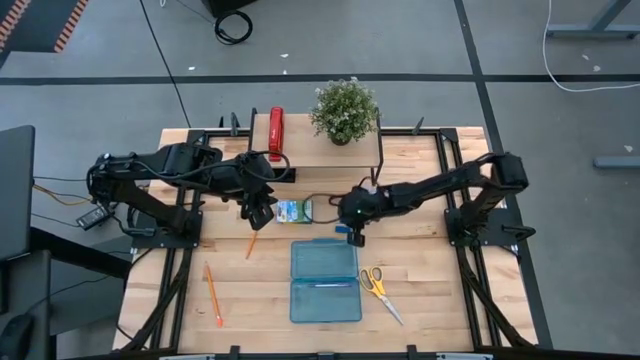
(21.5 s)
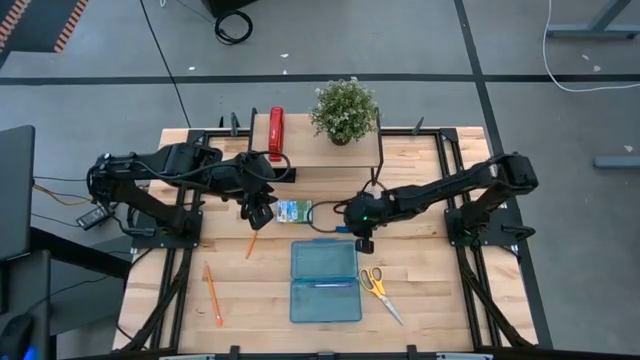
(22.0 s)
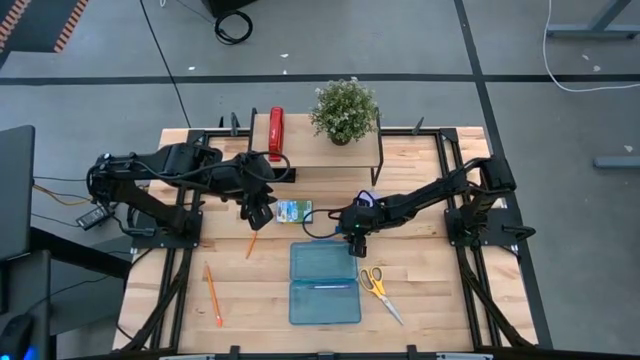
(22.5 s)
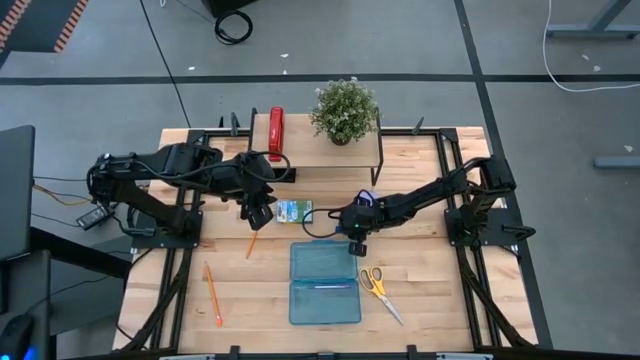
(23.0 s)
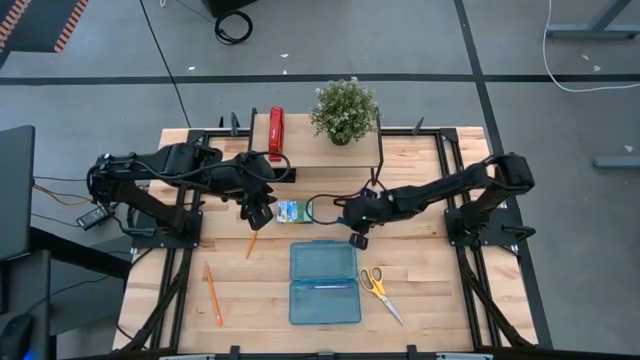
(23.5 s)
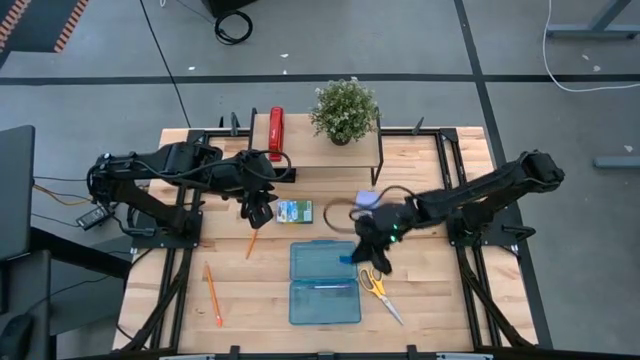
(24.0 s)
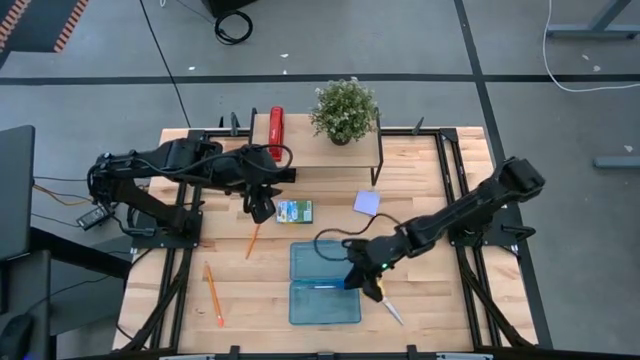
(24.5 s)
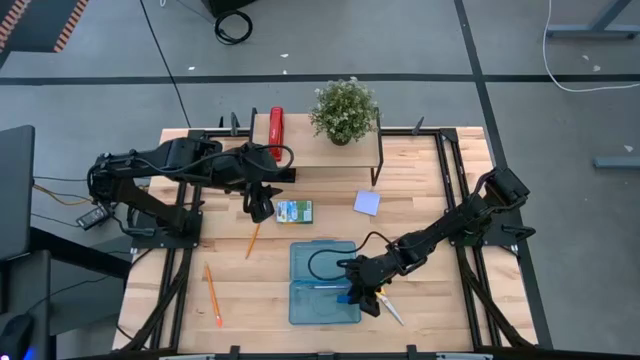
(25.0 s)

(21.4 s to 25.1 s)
Task: Pack school essentials
Put the blue eraser into the blue supply box

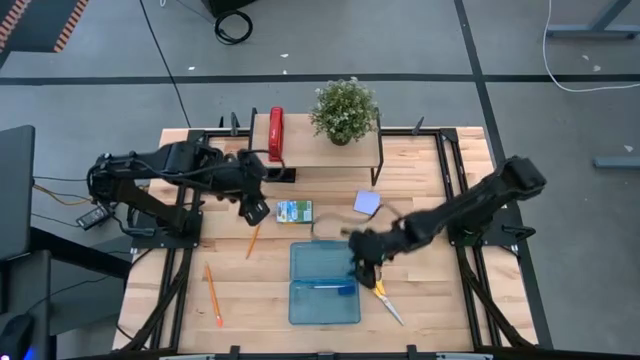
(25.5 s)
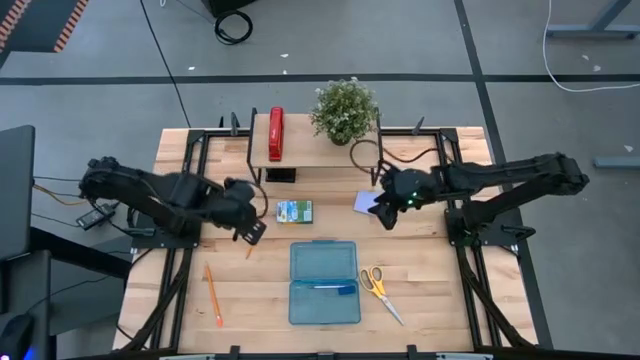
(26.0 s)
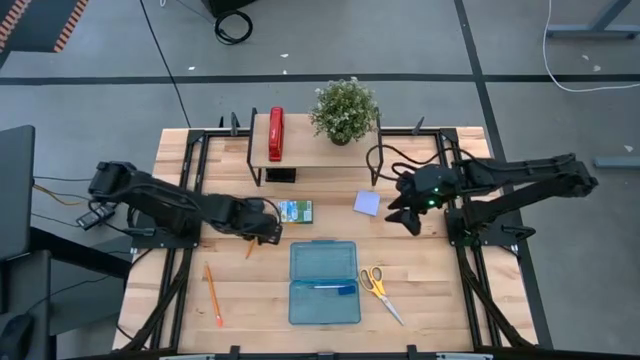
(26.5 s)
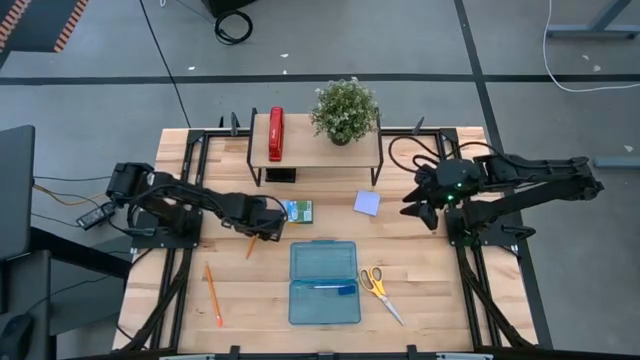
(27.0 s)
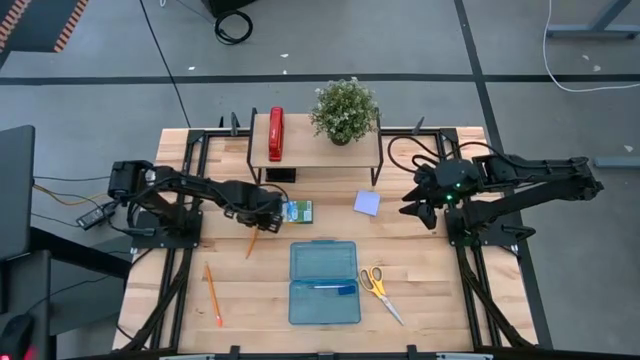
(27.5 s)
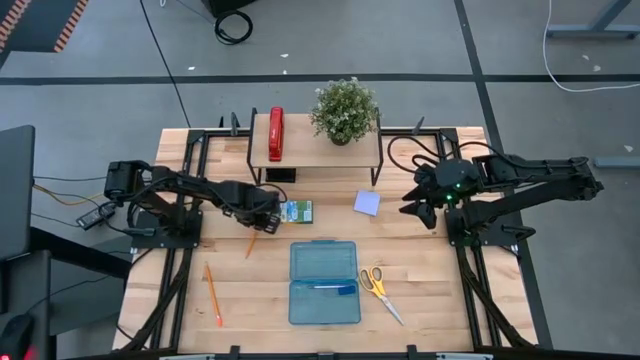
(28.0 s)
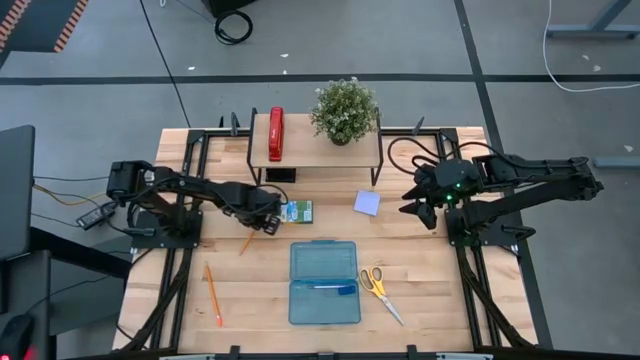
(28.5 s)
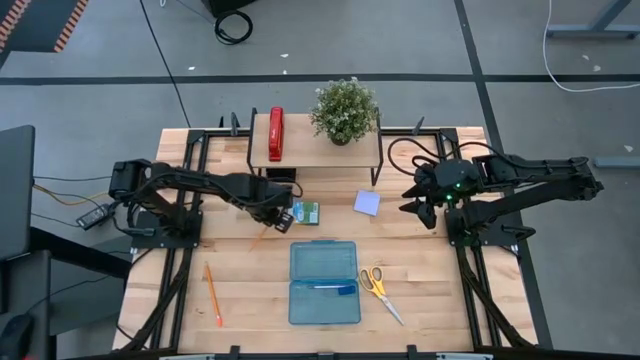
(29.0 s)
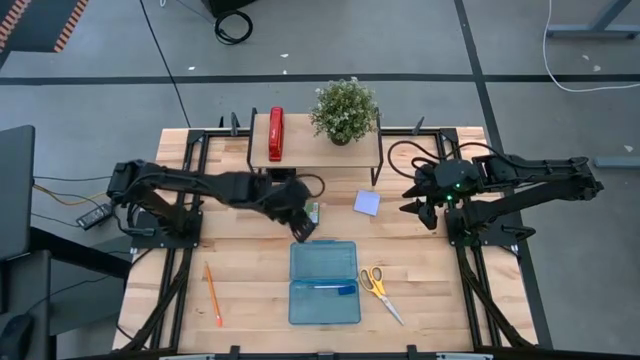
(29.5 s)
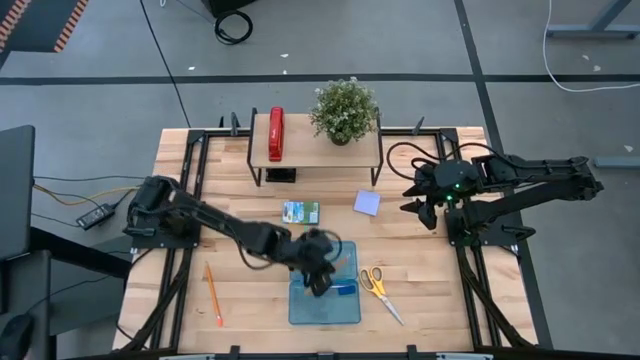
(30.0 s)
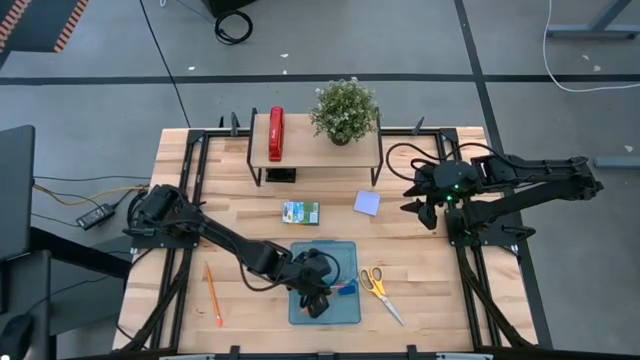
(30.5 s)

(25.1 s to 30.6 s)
Put the top yellow pencil into the blue supply box

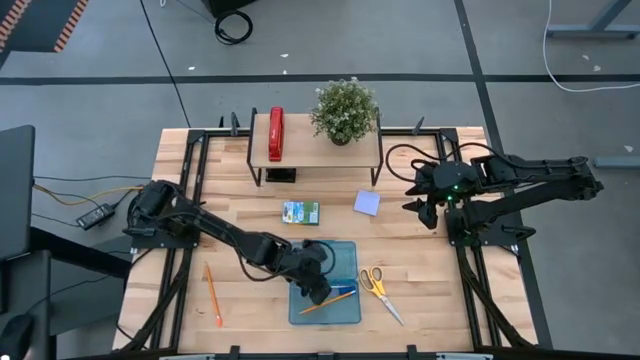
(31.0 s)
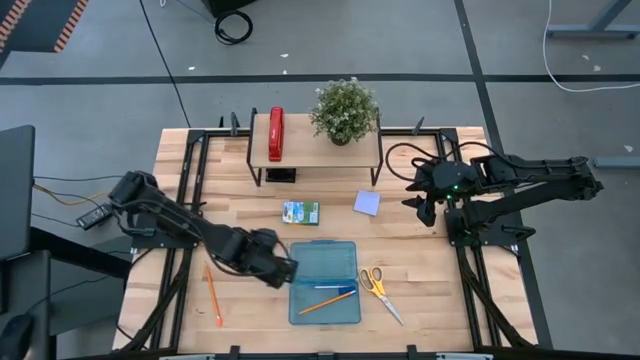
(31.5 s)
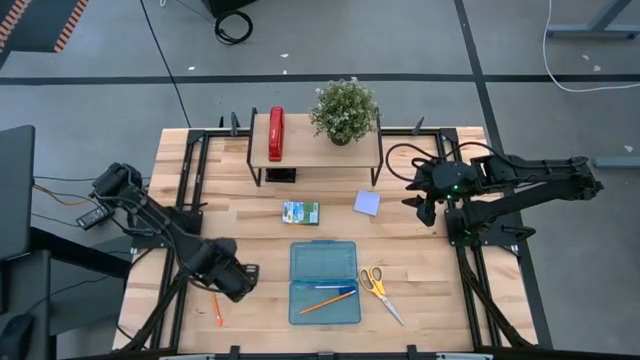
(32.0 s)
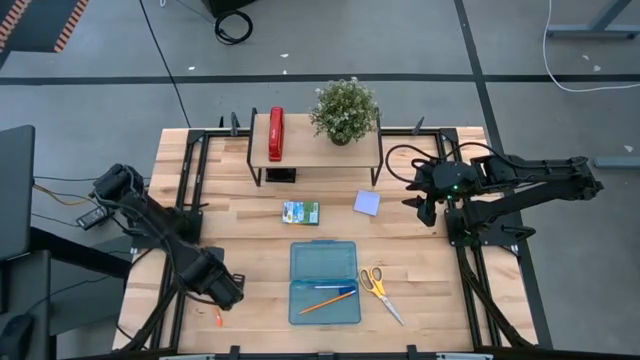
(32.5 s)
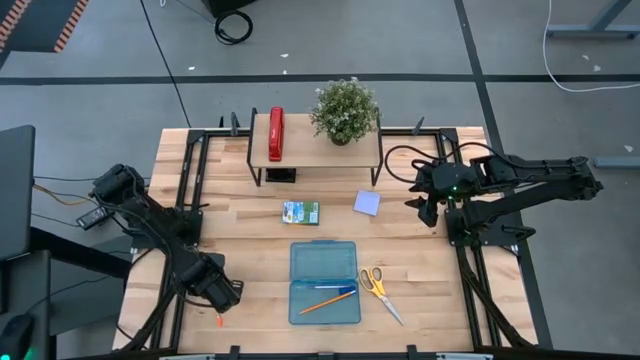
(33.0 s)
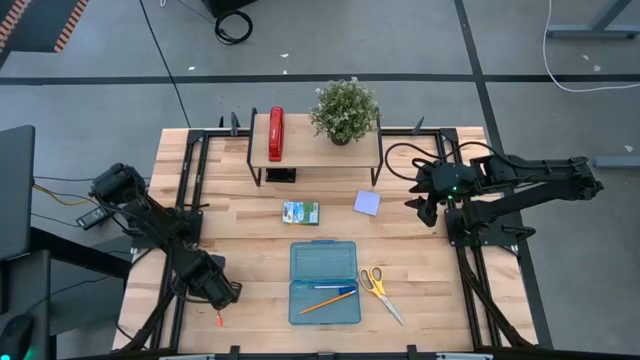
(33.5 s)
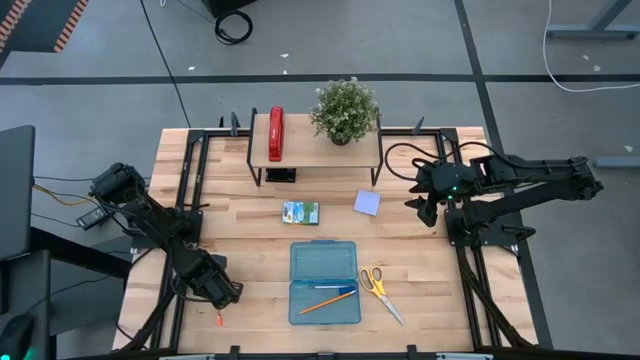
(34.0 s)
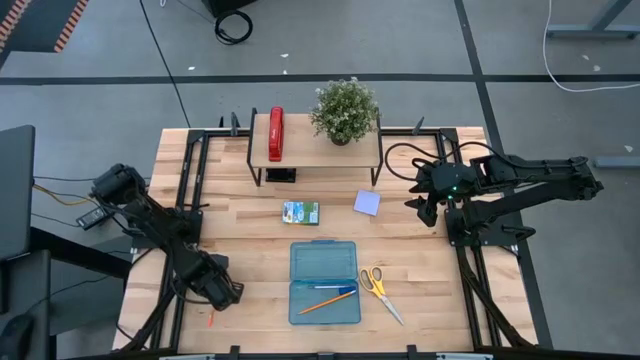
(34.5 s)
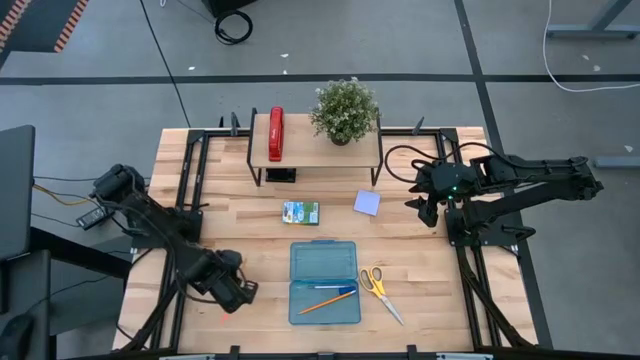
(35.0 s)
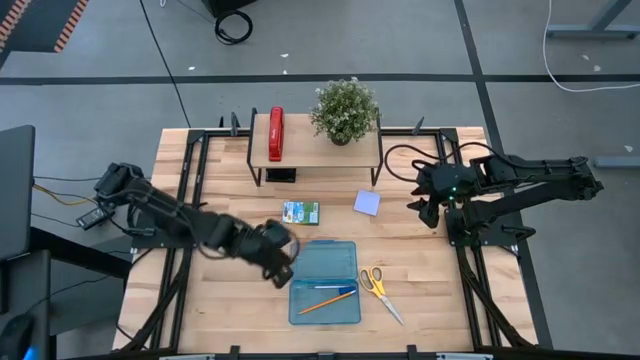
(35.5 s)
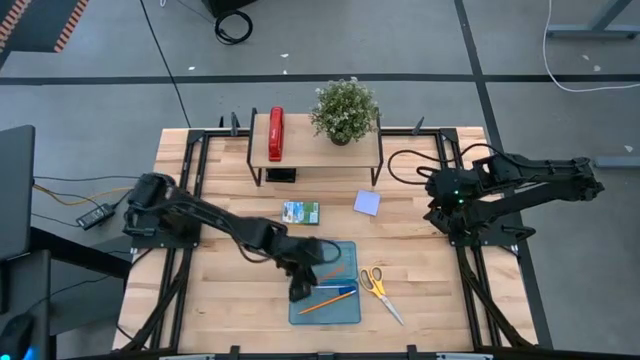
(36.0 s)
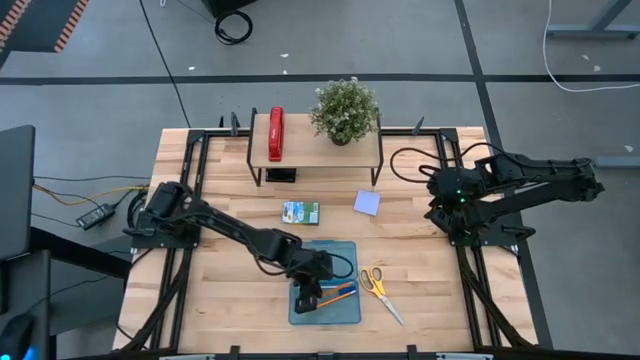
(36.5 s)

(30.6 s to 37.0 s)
Put the yellow pencil into the blue supply box

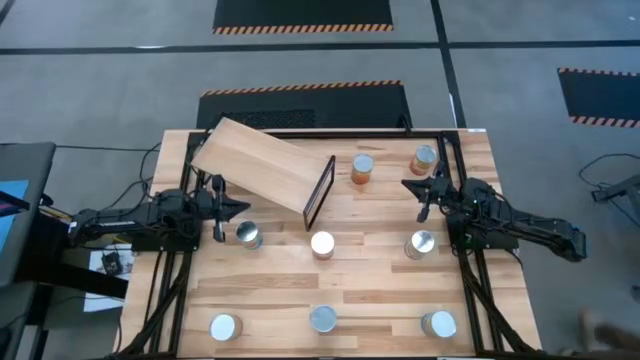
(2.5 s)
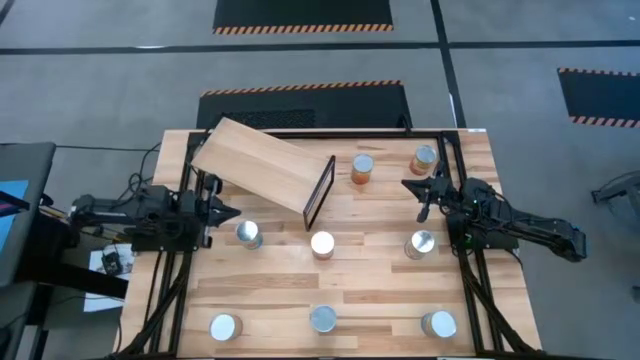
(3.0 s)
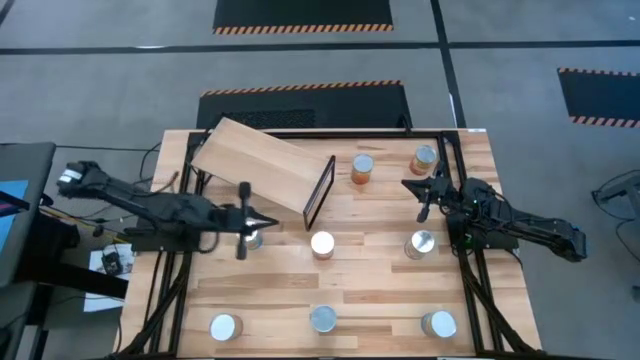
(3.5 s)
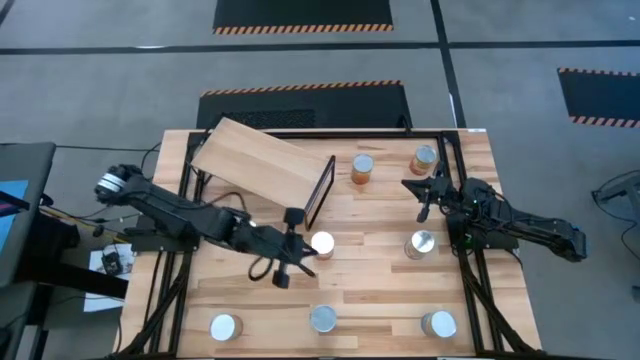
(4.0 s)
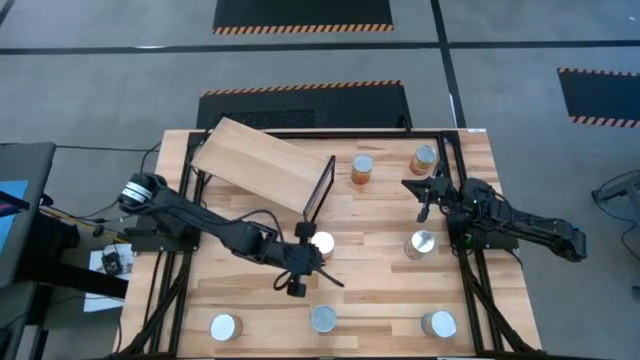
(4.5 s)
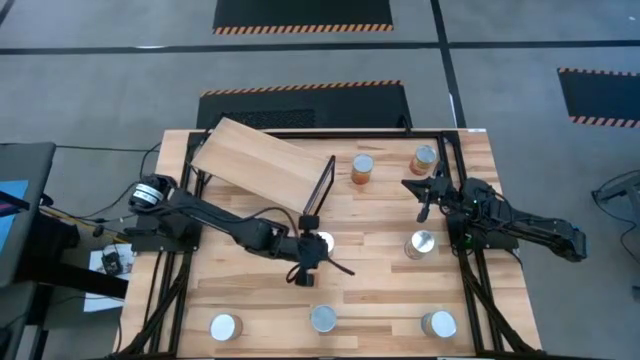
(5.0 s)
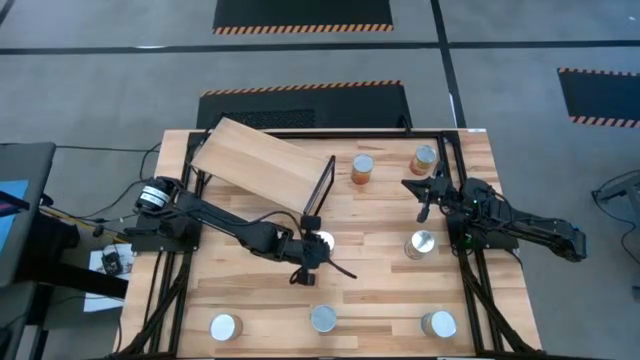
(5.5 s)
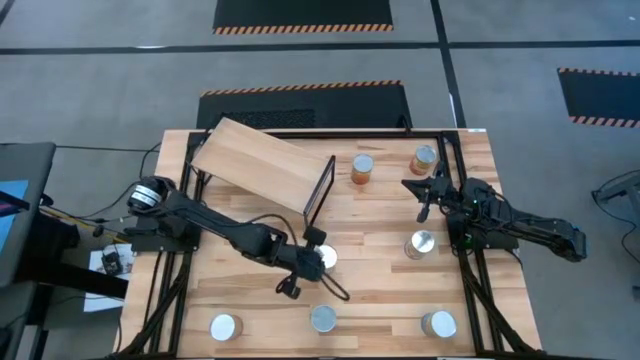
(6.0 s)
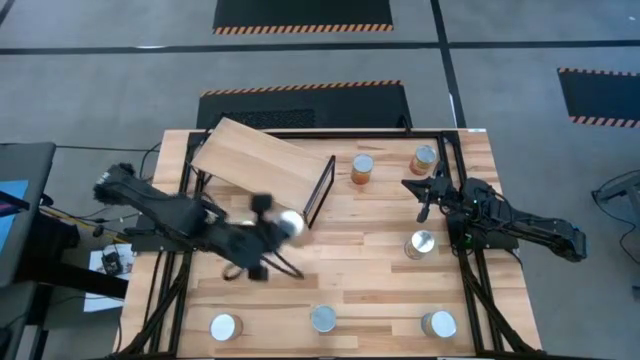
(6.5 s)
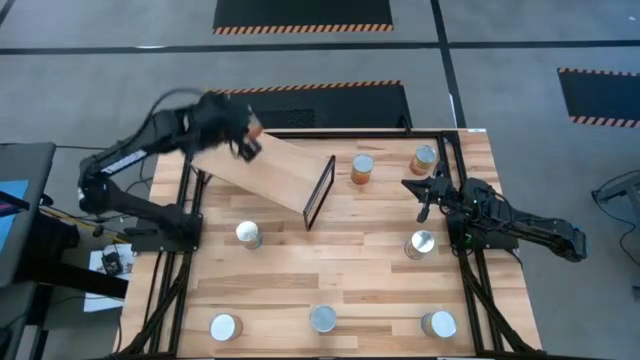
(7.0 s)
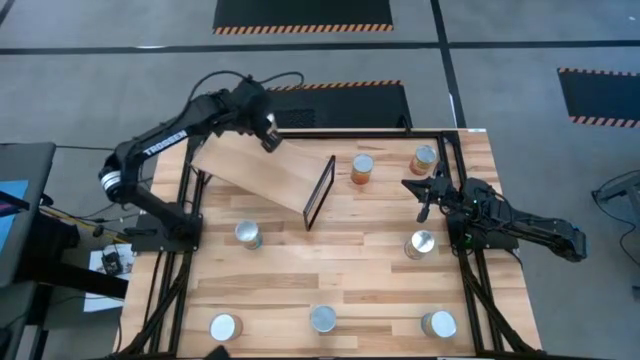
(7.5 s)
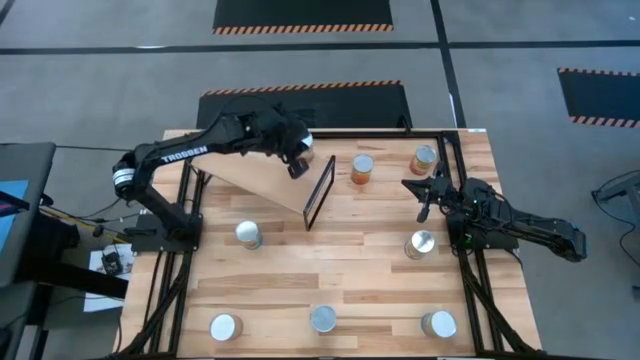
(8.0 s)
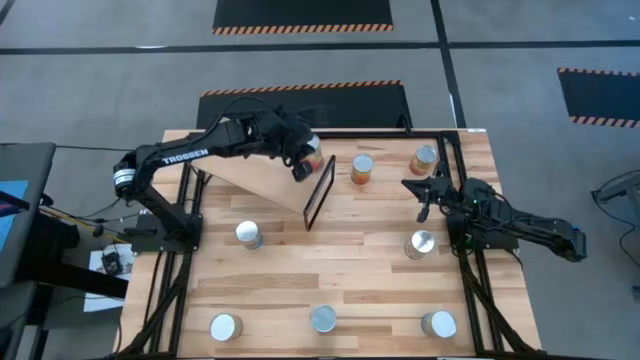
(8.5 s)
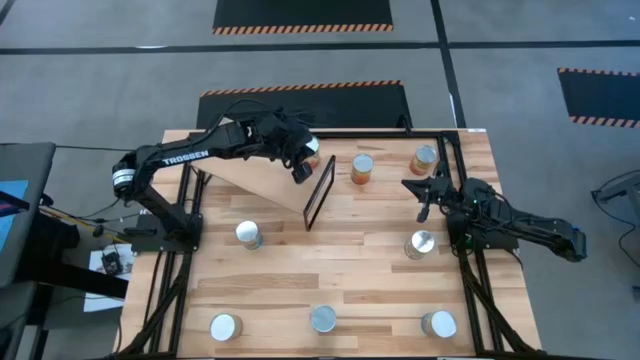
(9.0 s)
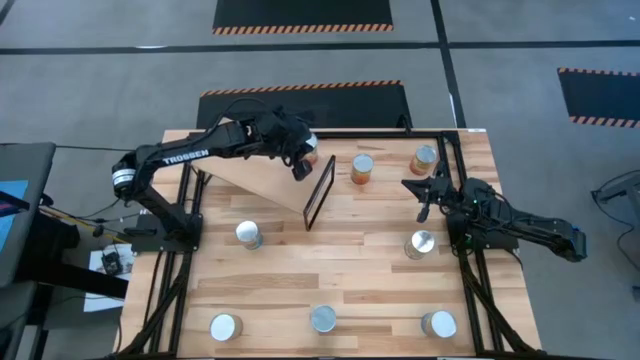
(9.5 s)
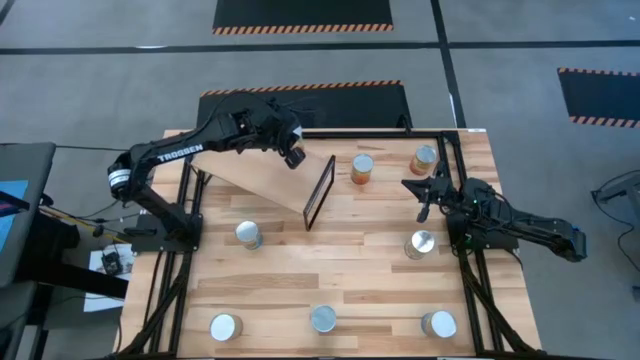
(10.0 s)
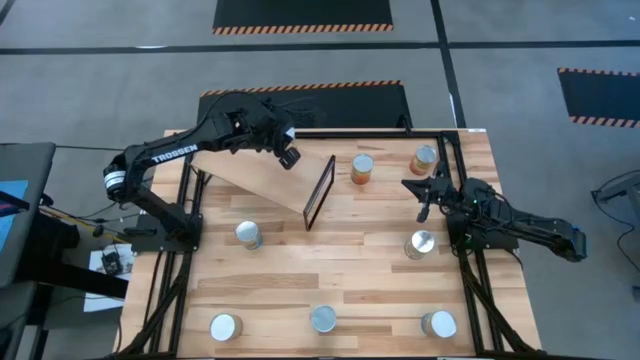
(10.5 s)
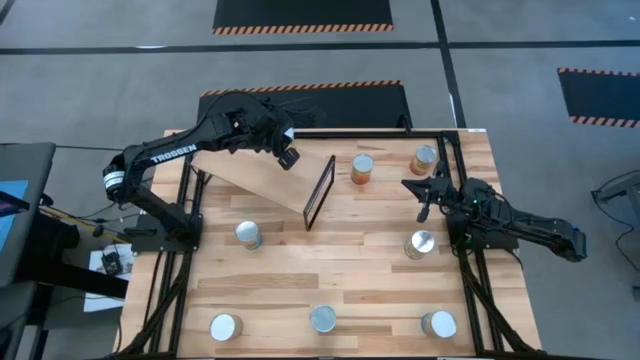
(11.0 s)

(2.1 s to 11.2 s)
Task: Pick and place cans onto a shelf
Put the bottom canned corn on the shelf
